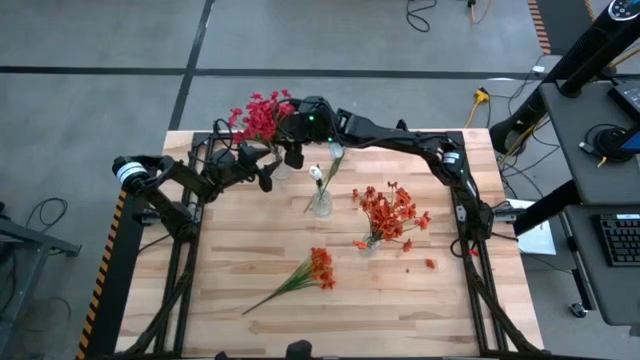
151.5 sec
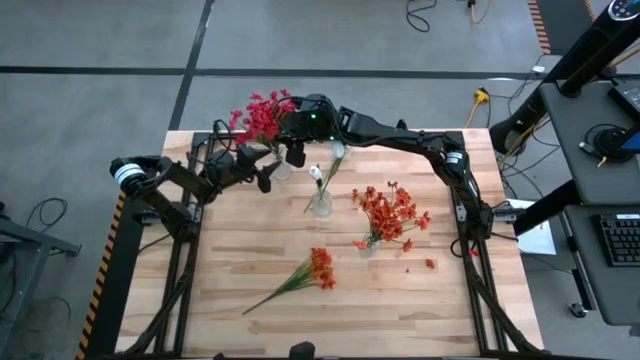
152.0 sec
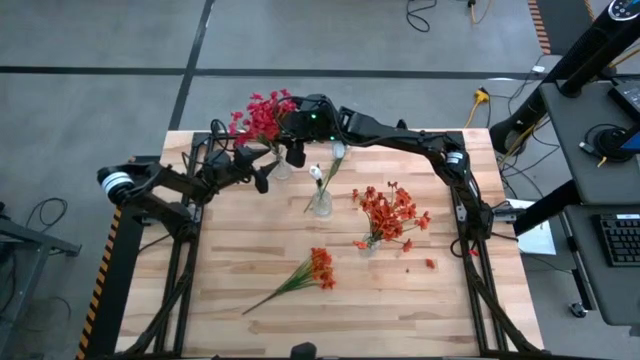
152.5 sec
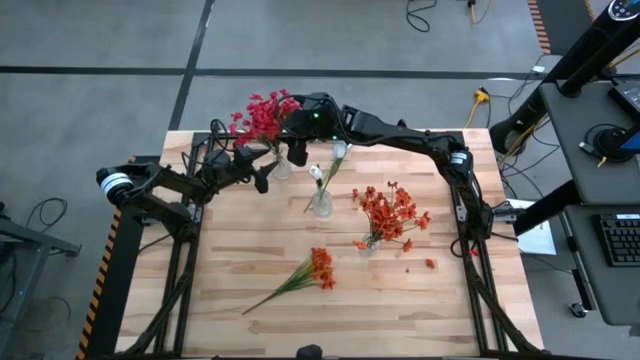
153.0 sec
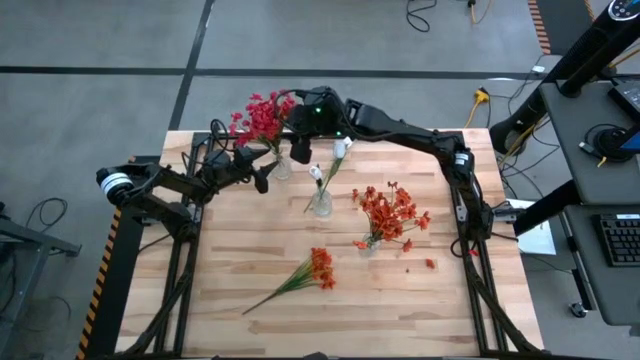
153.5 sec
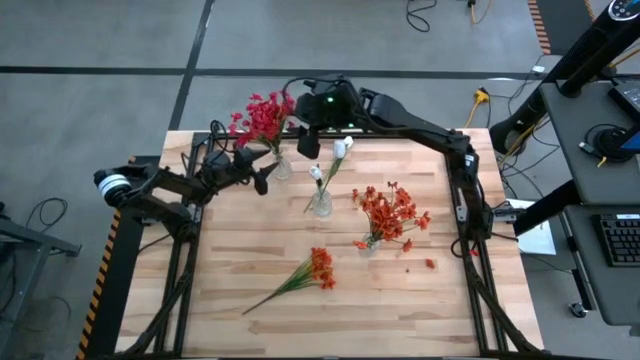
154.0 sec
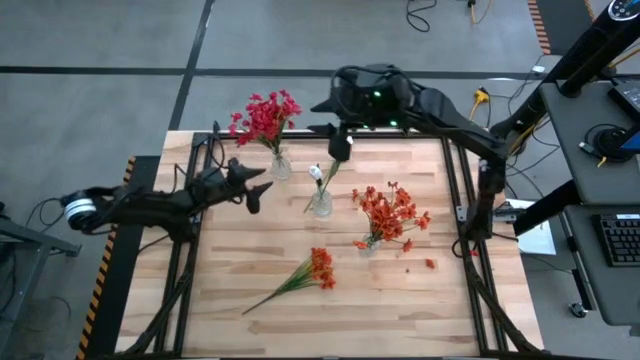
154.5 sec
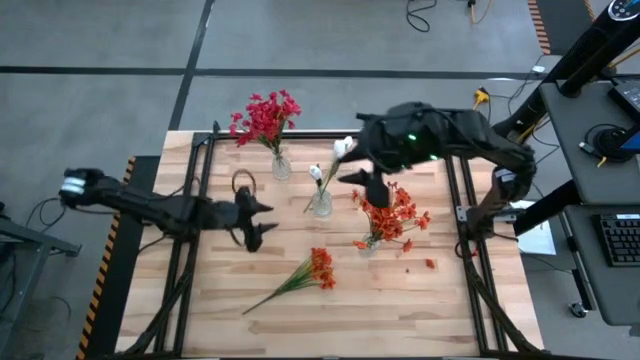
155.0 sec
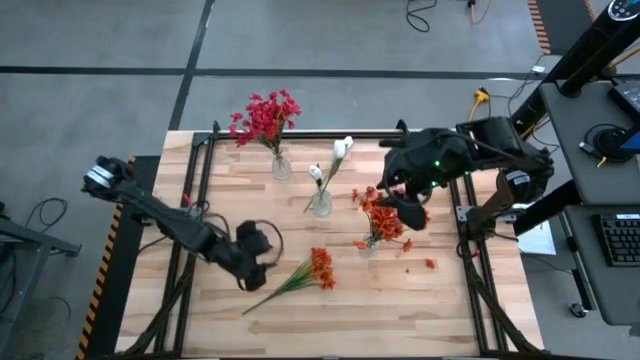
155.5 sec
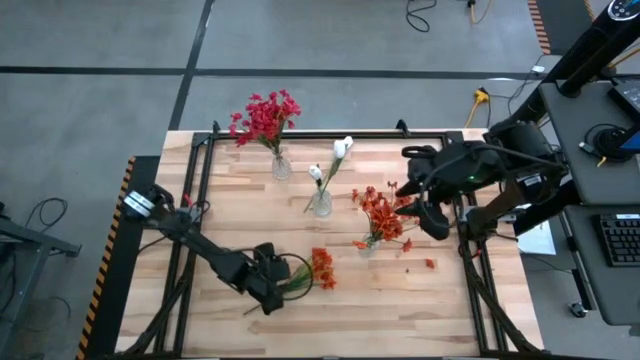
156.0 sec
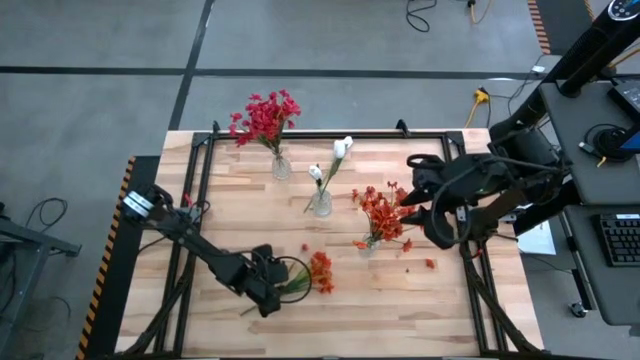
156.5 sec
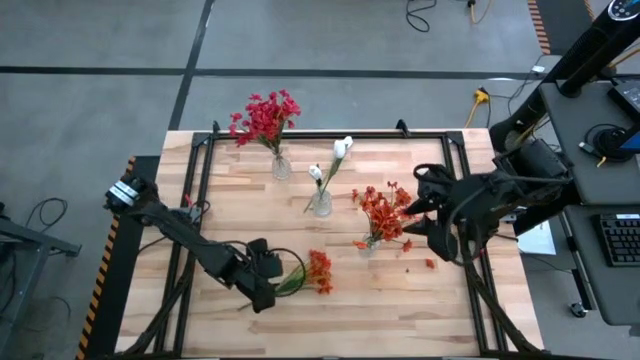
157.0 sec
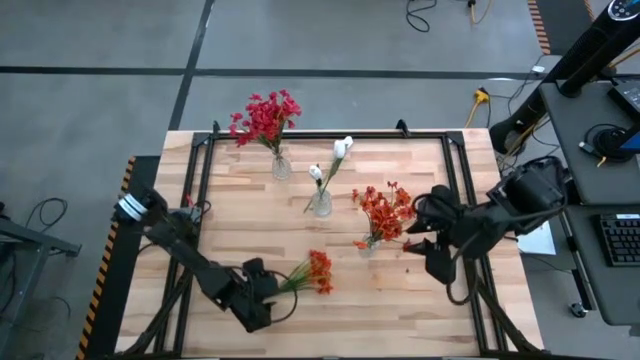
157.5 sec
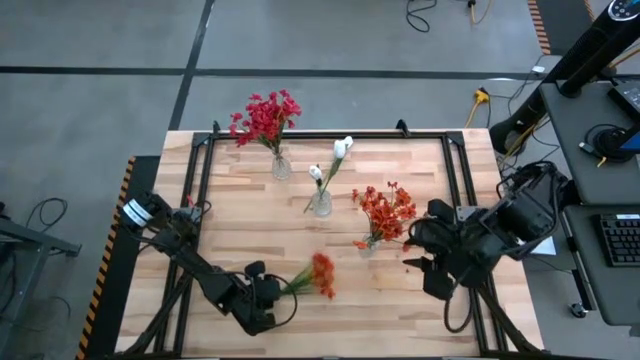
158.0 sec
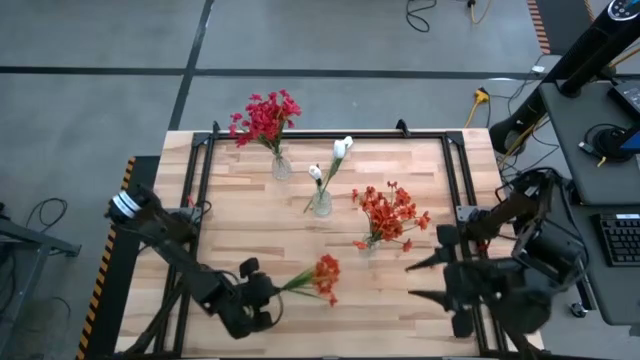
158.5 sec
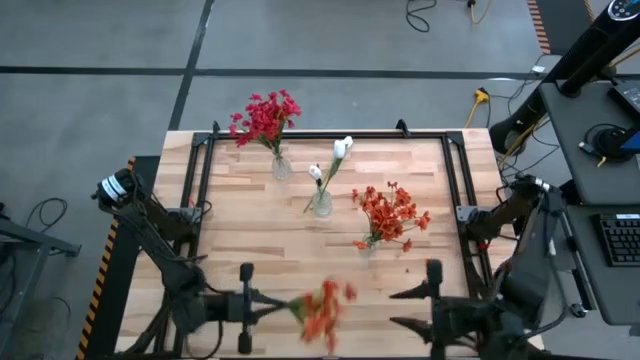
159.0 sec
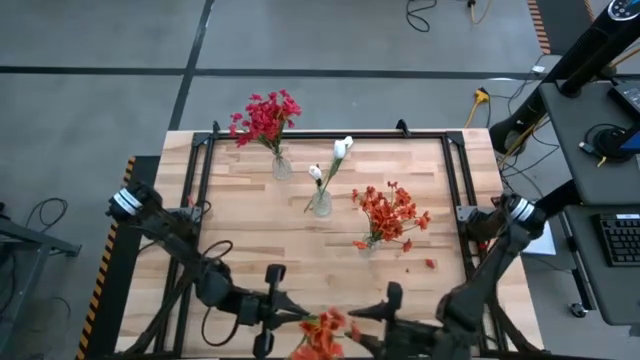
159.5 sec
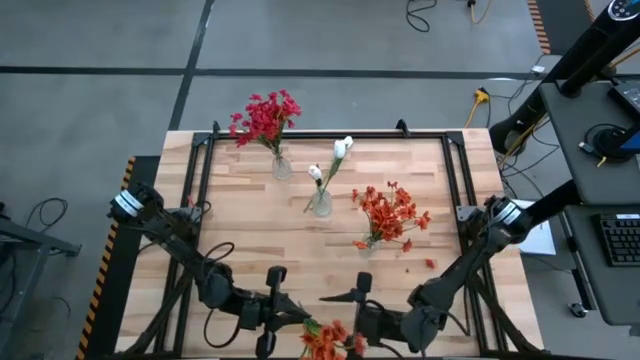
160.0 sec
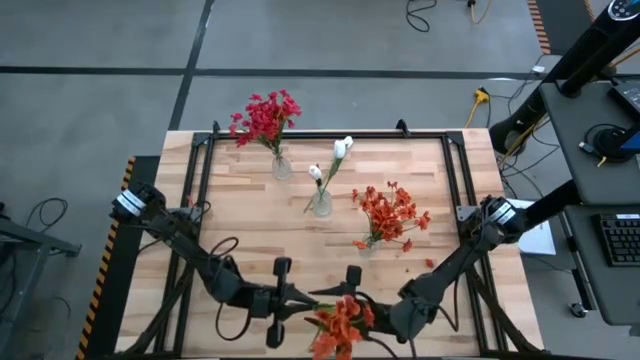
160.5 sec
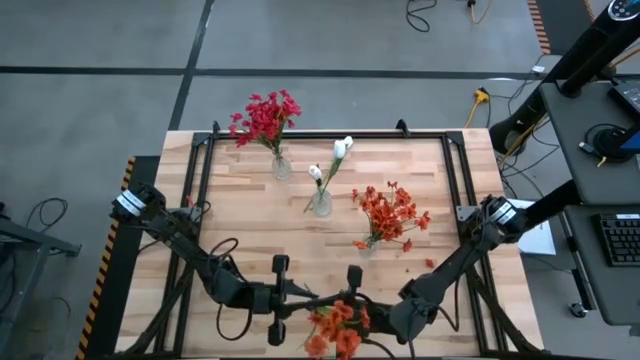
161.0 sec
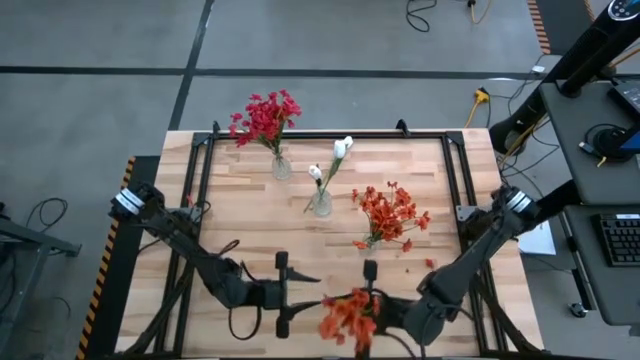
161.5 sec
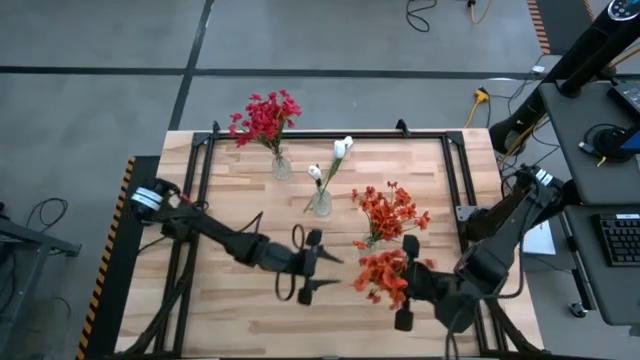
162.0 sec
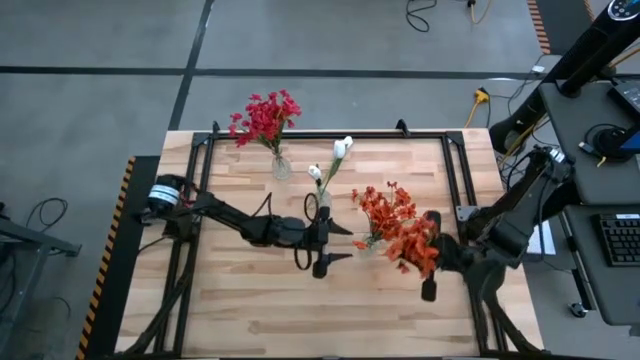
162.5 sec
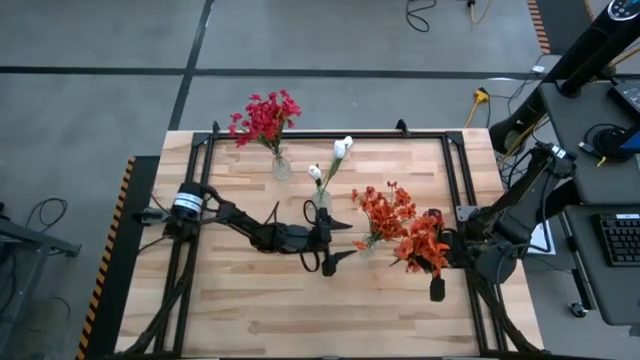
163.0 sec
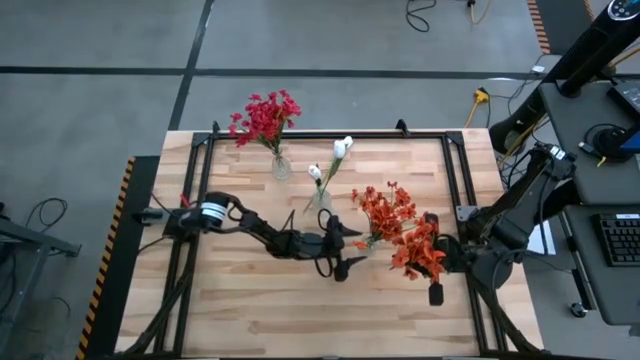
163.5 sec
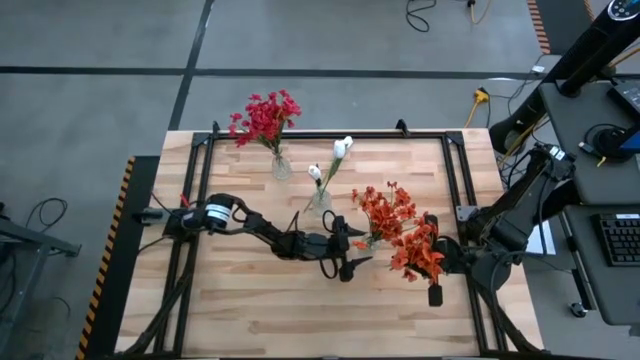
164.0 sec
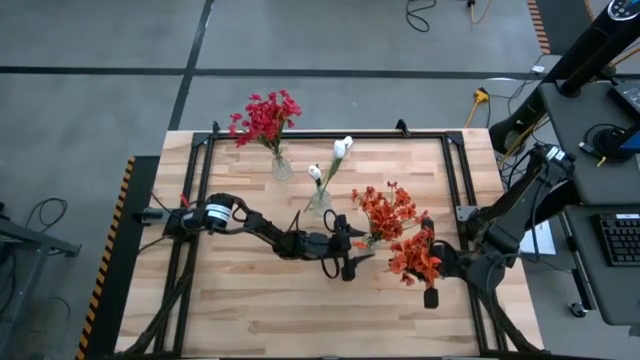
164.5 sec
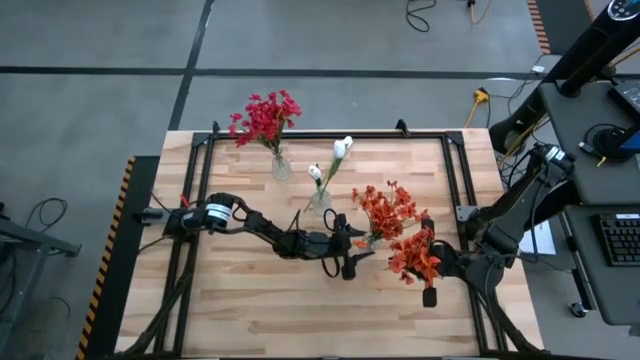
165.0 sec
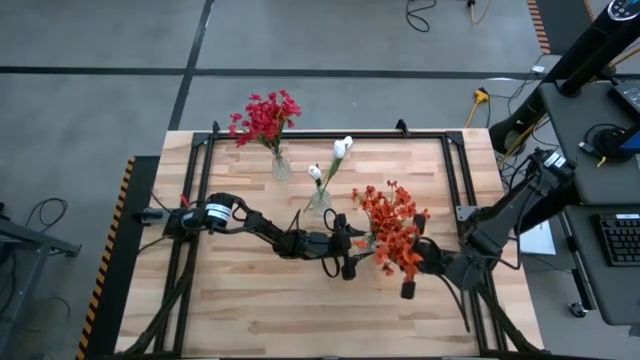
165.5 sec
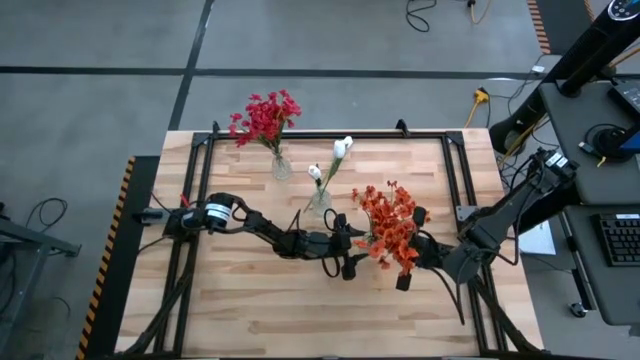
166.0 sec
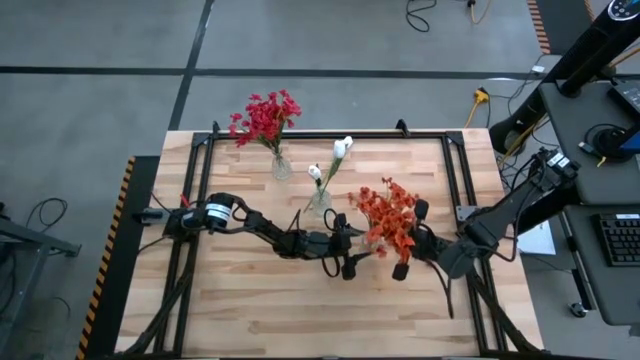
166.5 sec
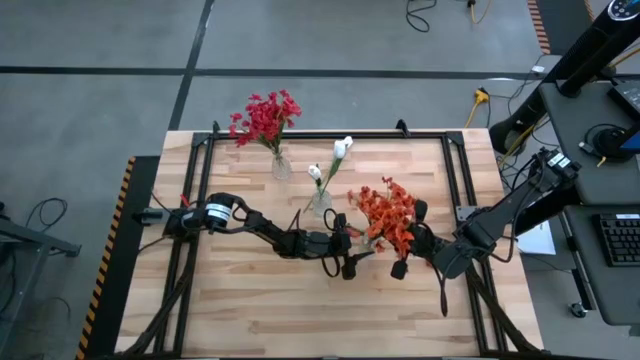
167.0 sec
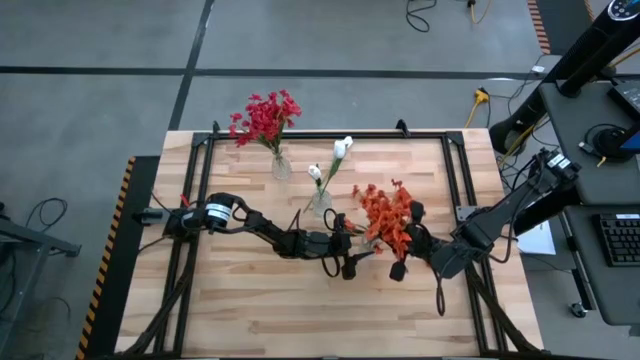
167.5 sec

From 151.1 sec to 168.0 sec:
Task: Sort flowers into vase by color
Put the orange sprig flower into the bottom right transparent glass vase

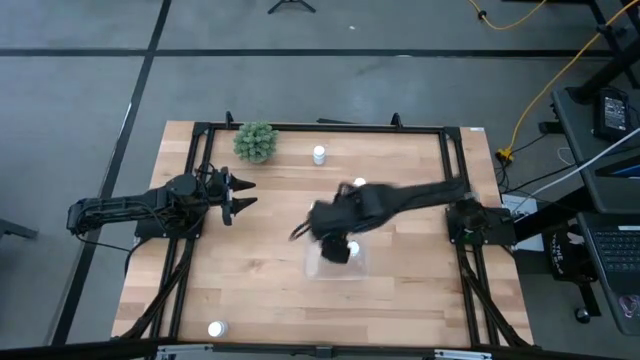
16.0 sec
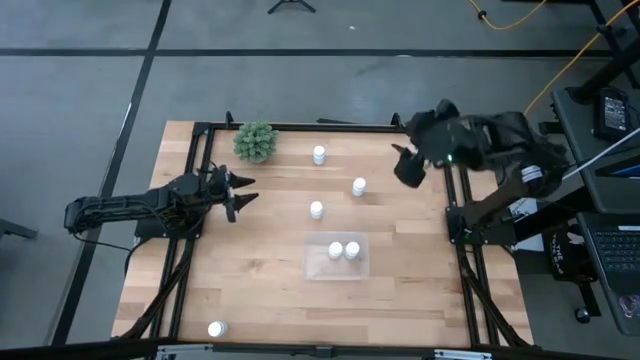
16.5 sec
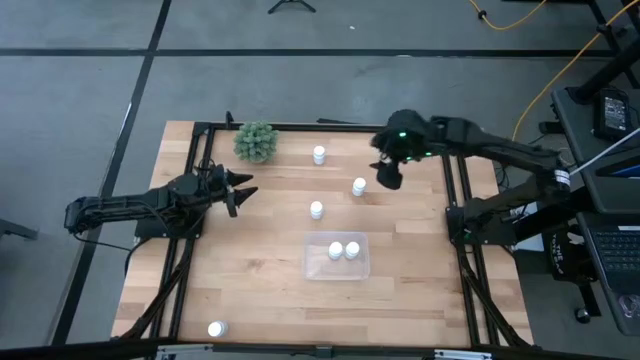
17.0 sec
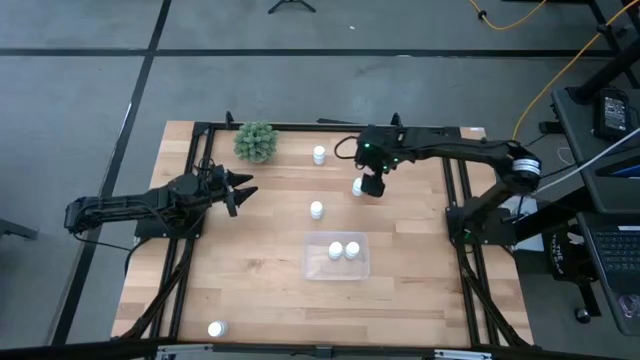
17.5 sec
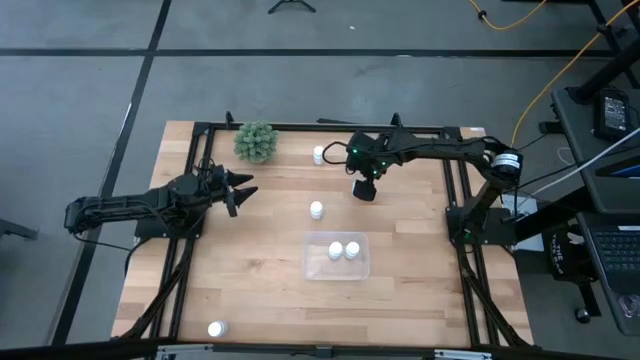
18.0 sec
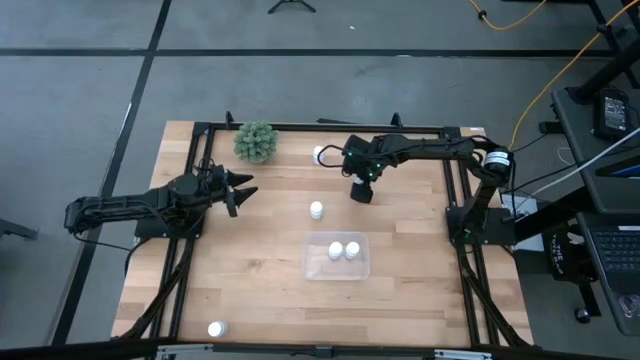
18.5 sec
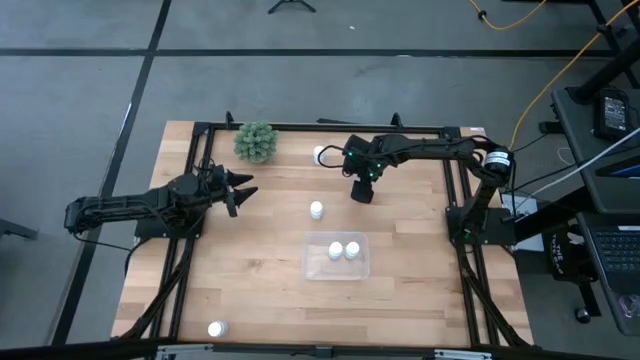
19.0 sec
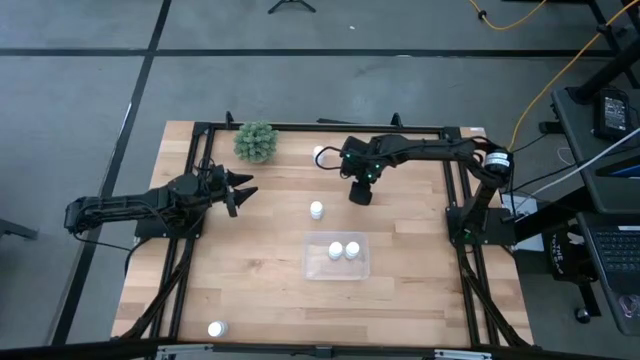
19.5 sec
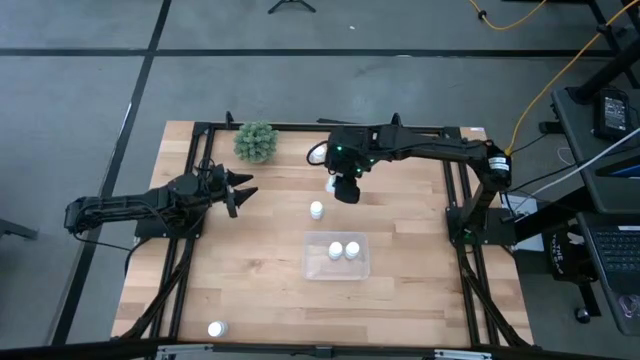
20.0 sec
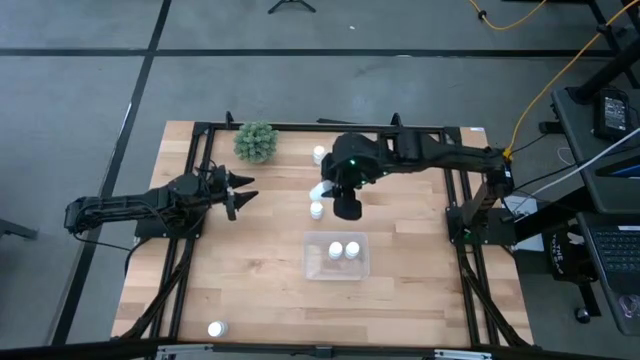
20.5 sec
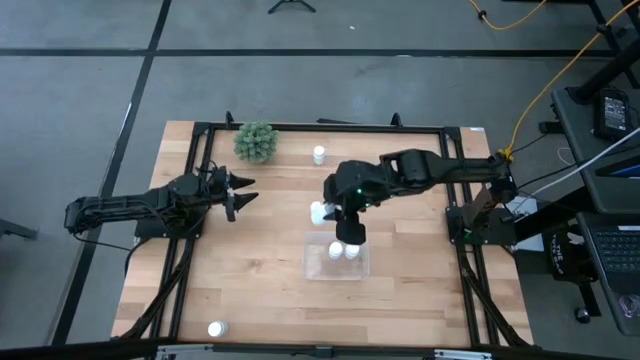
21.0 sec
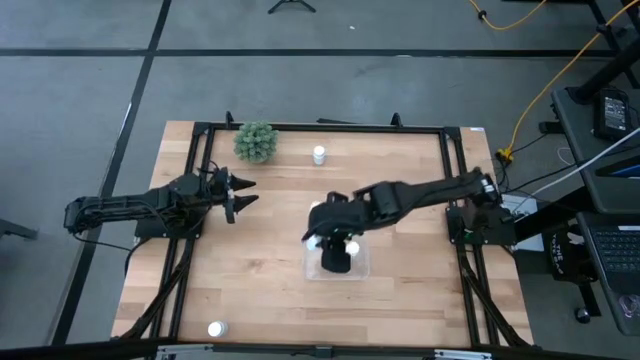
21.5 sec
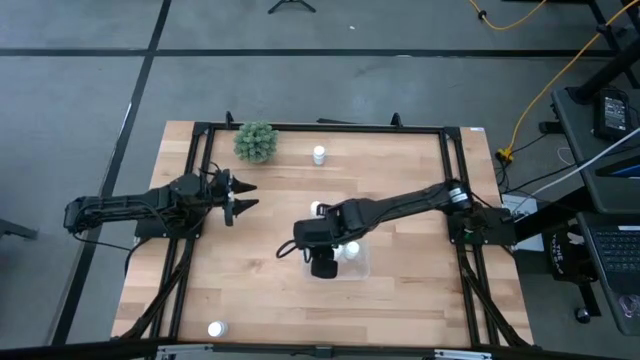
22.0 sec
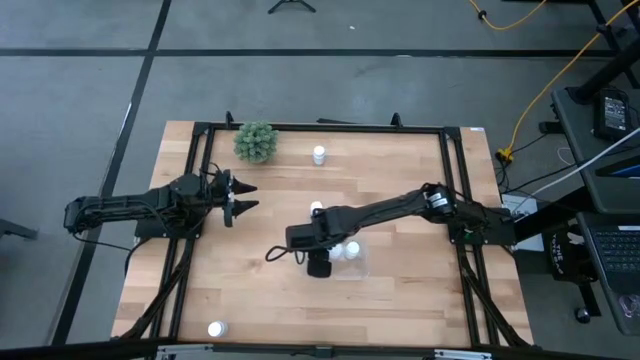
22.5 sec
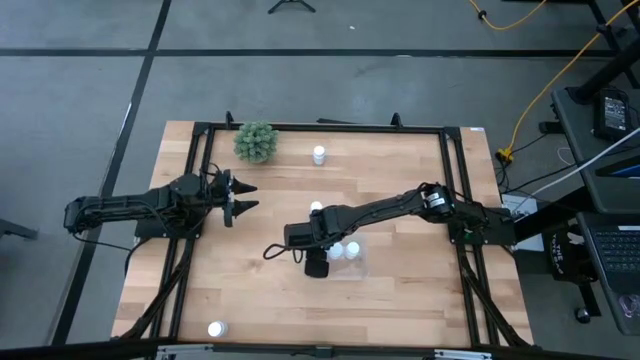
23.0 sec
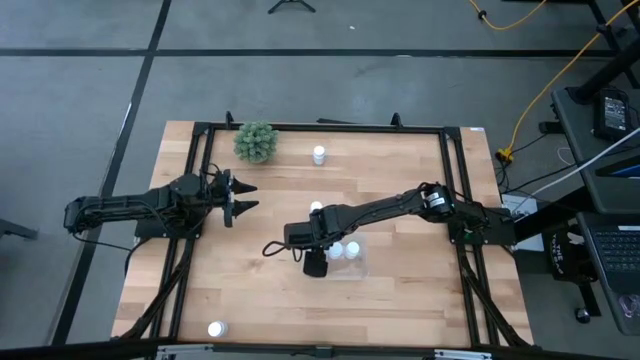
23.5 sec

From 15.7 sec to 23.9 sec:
Task: Pick and place pill bottles into a basket
Put the white medicine bottle into the transparent bin
